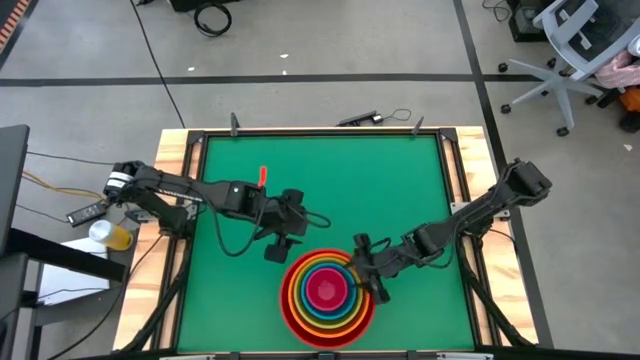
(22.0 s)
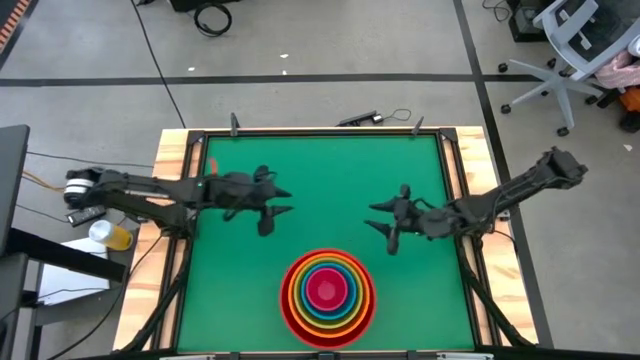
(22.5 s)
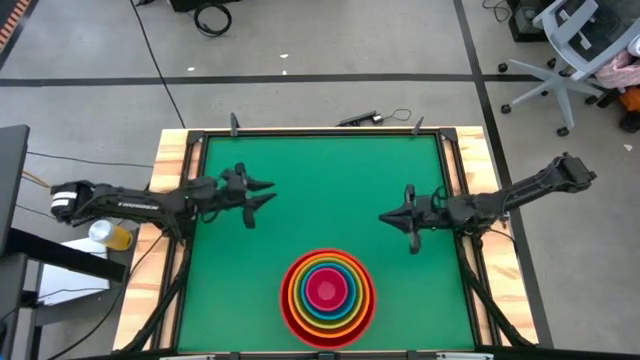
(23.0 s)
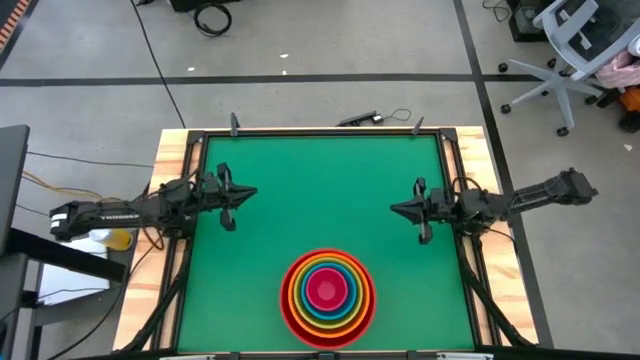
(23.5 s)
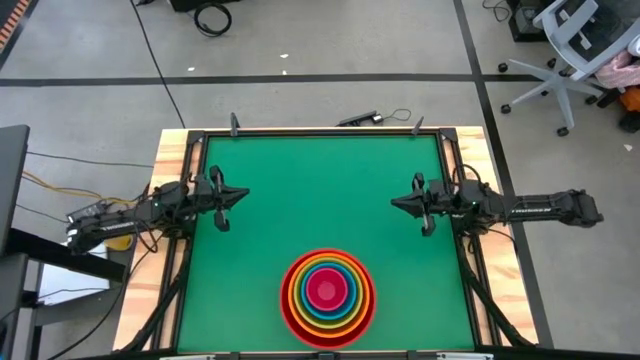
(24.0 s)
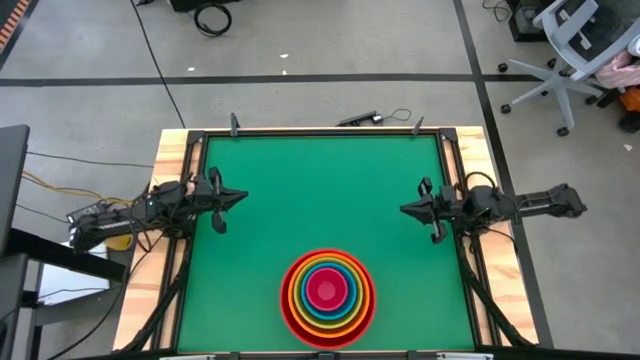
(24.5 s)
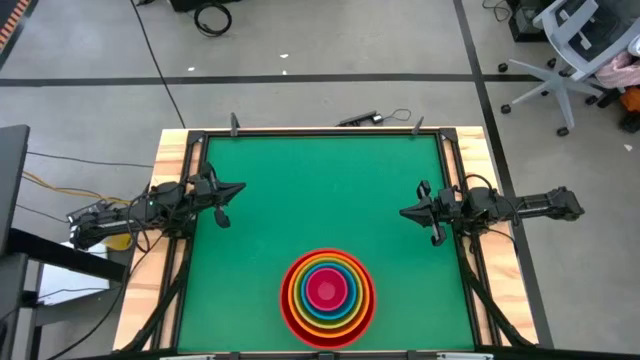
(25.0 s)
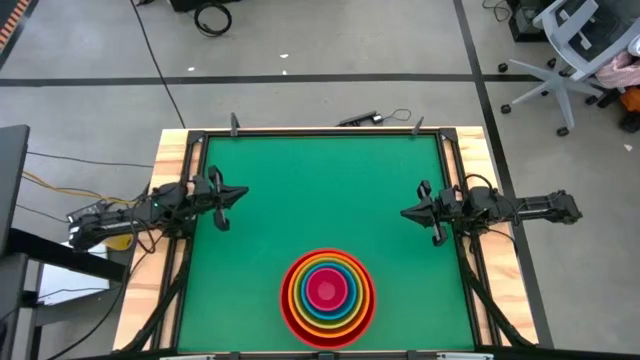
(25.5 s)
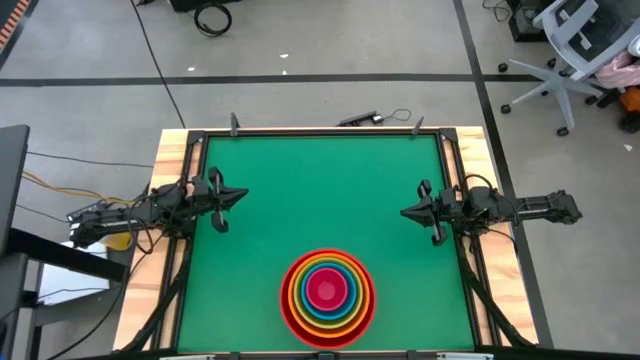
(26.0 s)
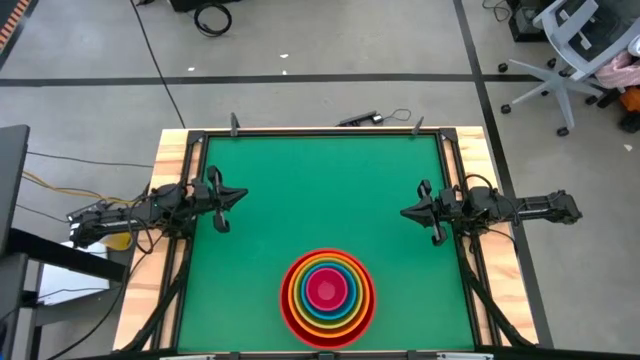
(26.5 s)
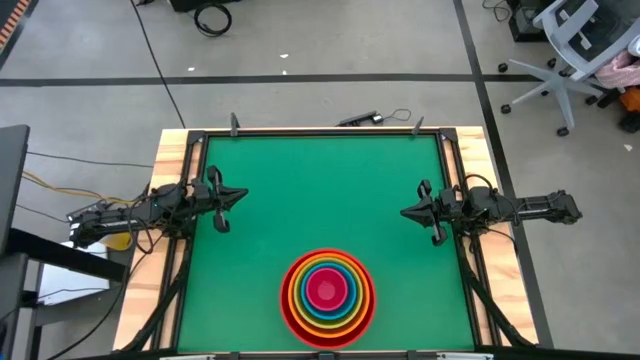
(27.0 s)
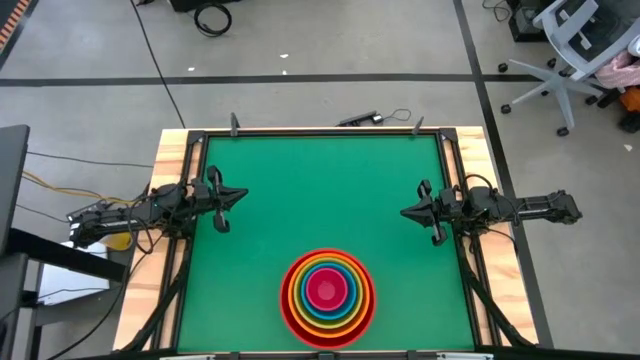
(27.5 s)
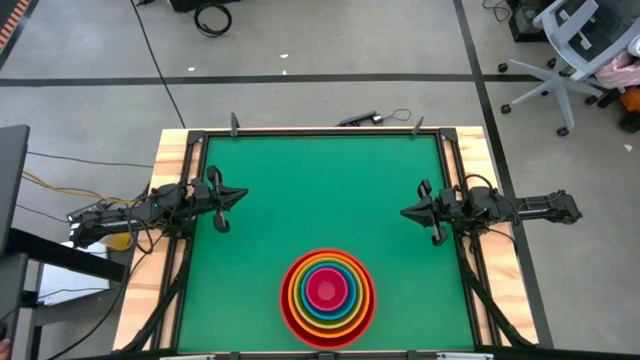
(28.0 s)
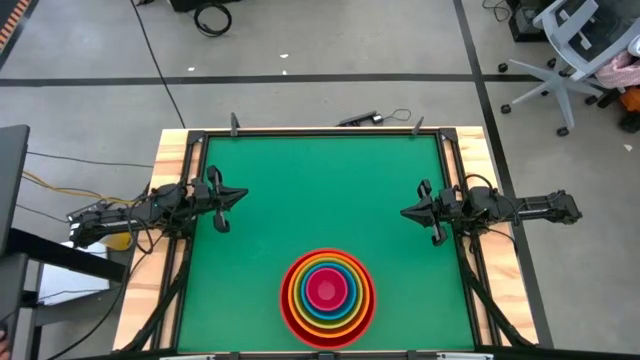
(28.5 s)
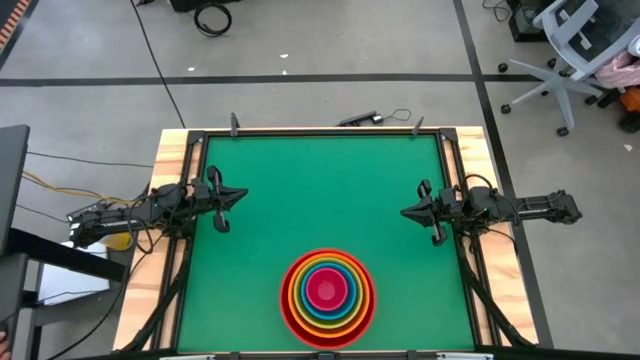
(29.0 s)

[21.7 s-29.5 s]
Return to Home Position

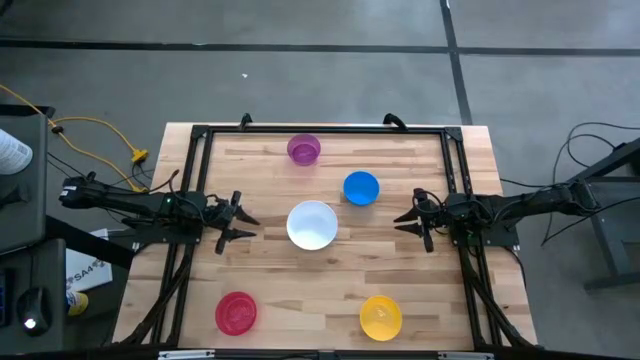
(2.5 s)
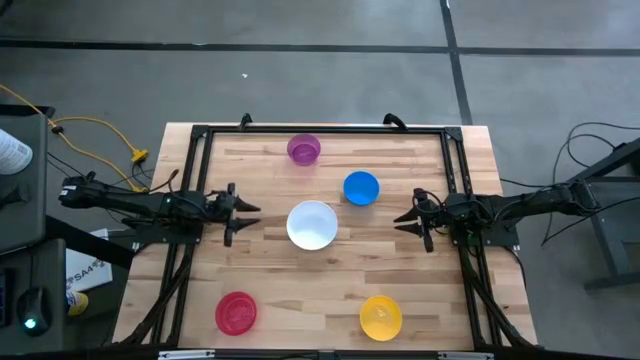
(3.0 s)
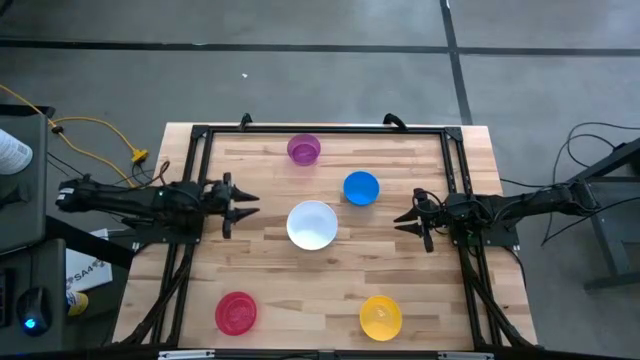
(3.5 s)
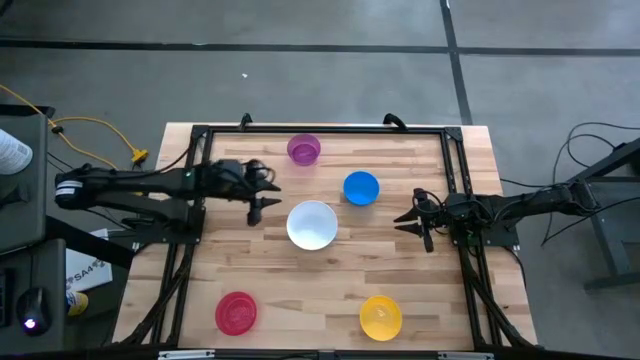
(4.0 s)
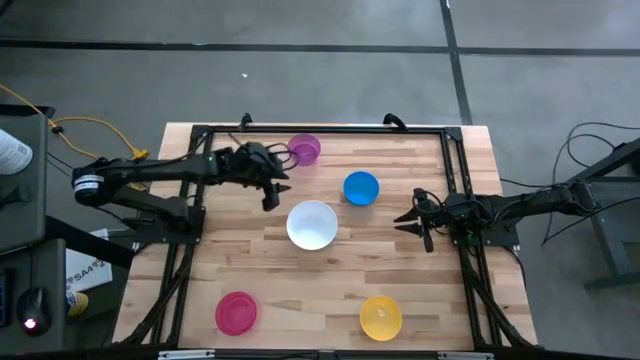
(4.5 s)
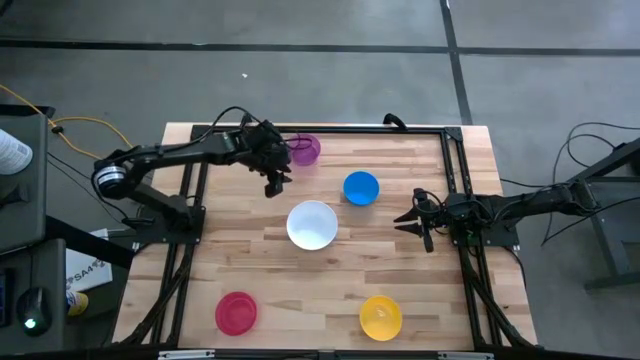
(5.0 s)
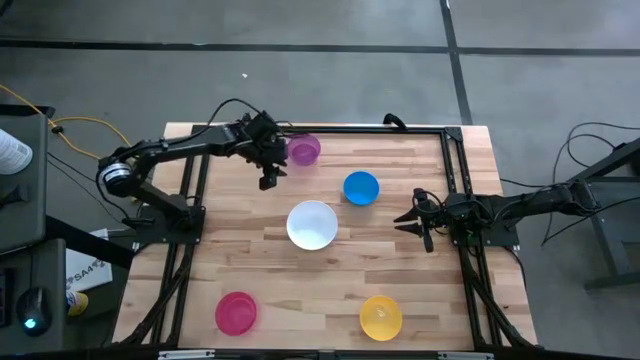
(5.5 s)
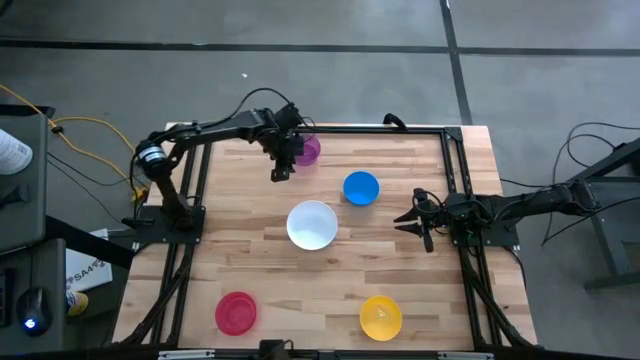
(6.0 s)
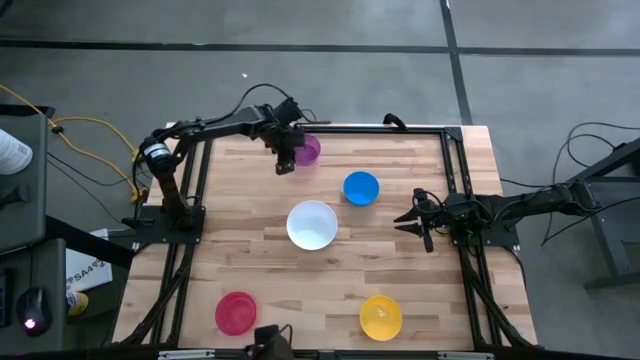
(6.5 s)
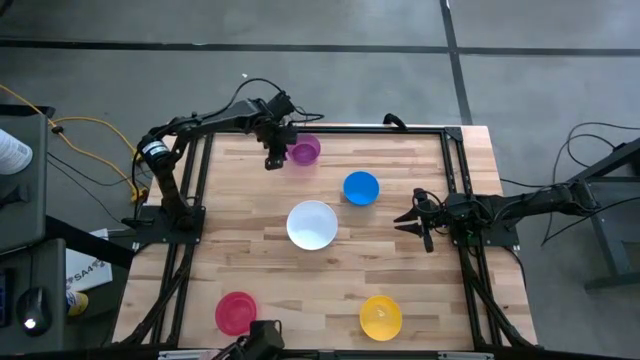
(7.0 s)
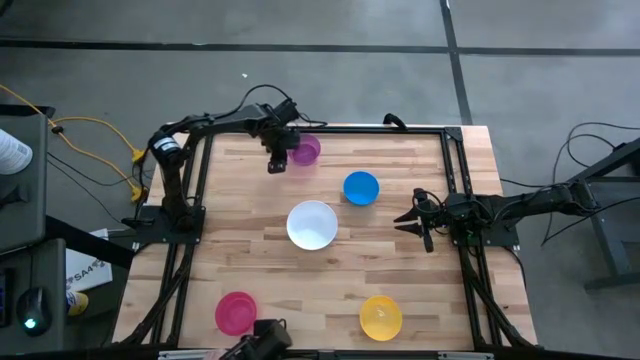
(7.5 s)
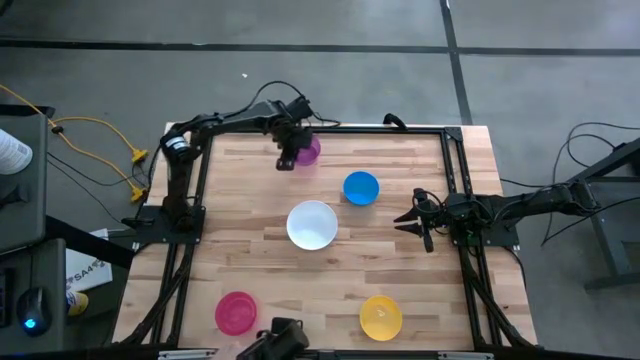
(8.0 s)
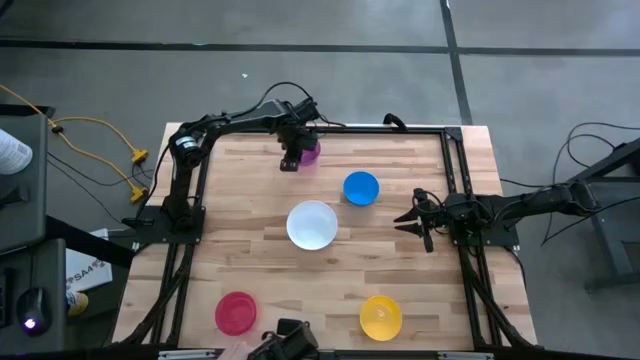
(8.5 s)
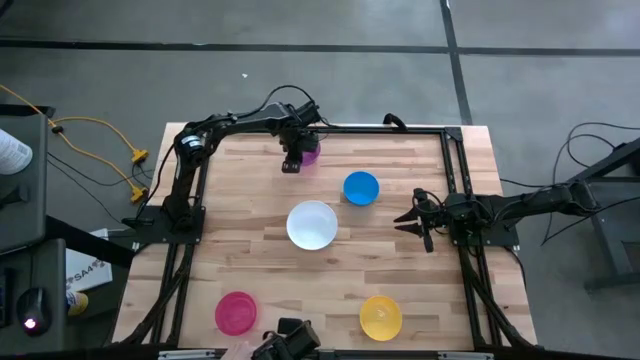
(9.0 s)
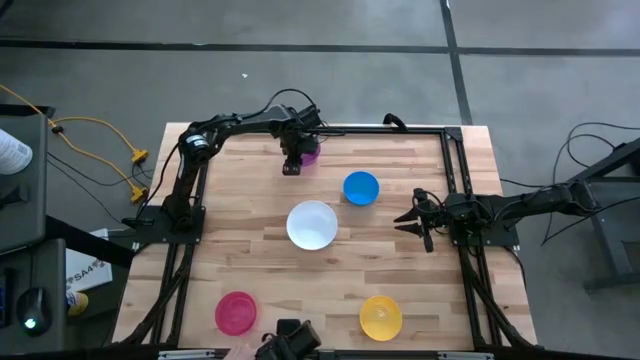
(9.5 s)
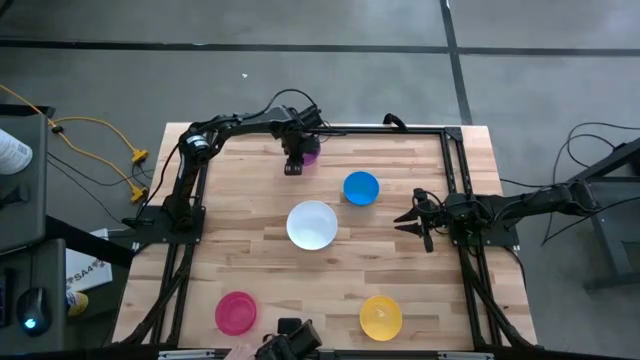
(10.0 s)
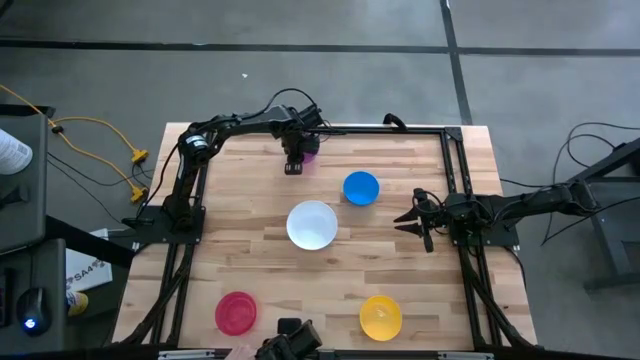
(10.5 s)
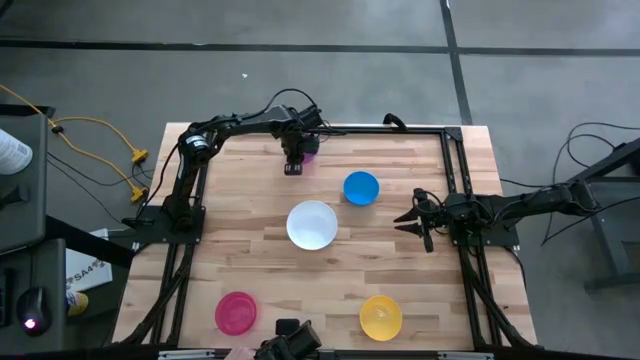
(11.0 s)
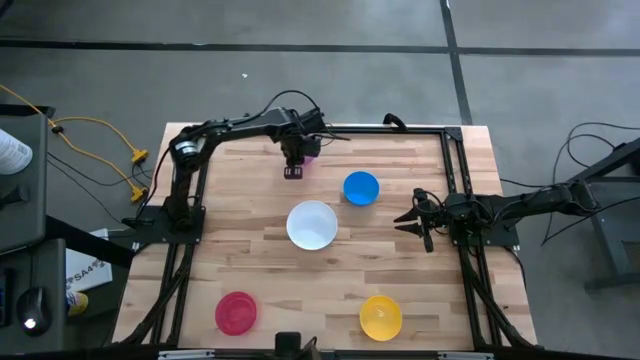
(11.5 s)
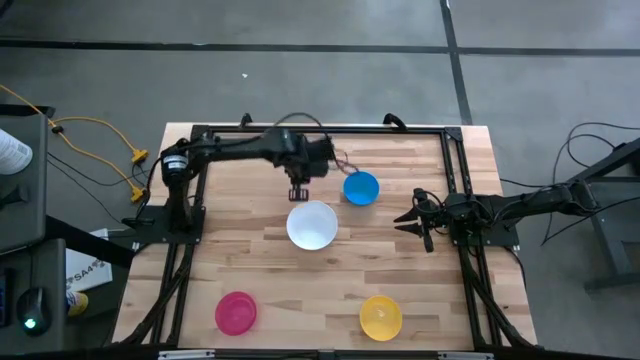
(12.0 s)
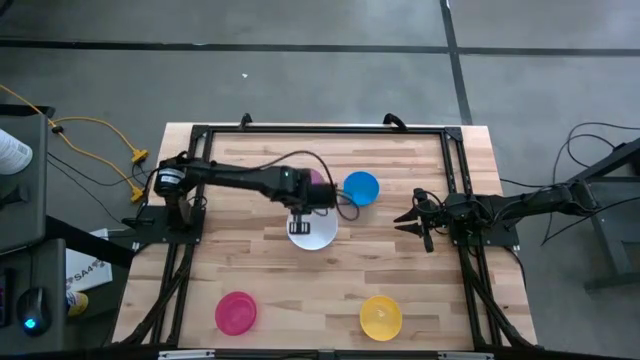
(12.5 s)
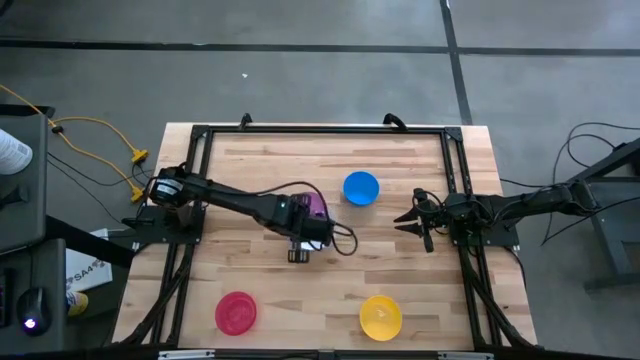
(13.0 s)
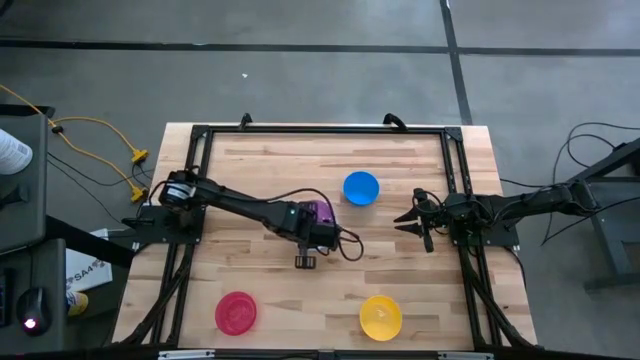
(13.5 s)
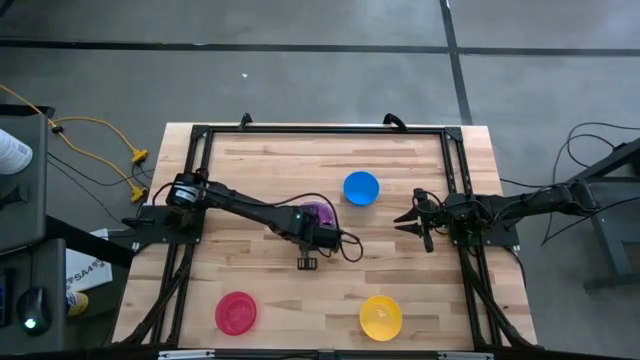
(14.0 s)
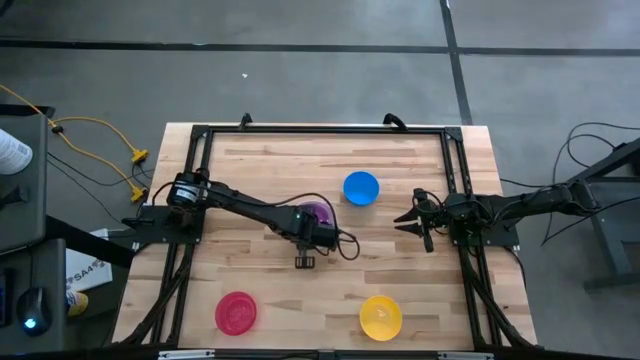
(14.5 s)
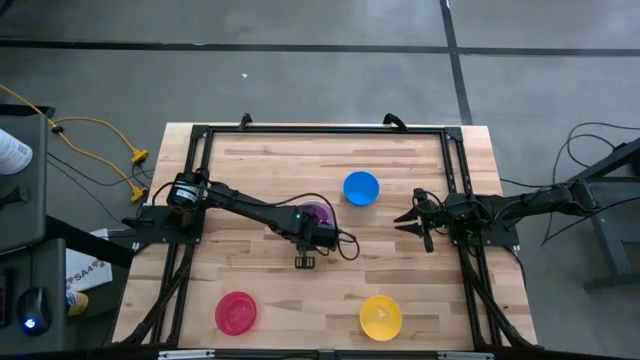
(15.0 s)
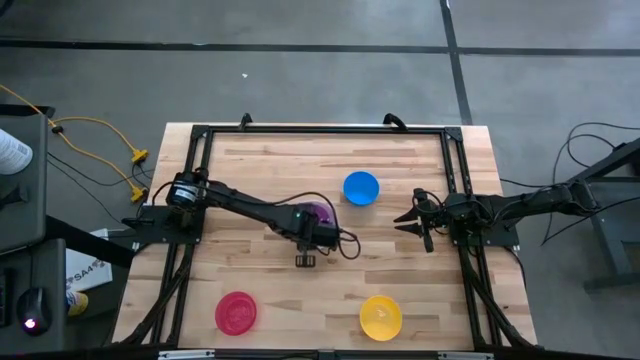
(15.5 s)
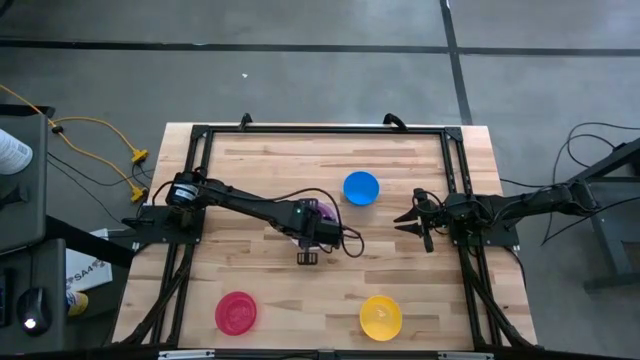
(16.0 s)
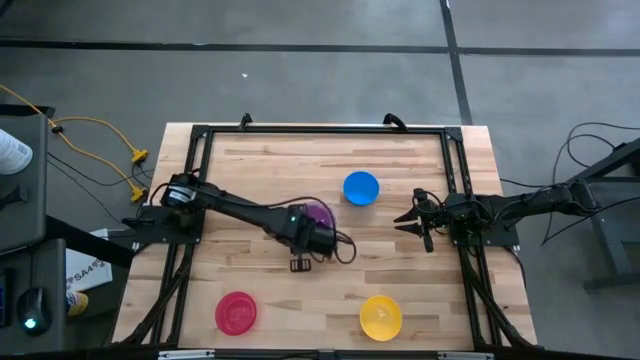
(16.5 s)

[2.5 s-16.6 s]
Stack the purple bowl into the white bowl
